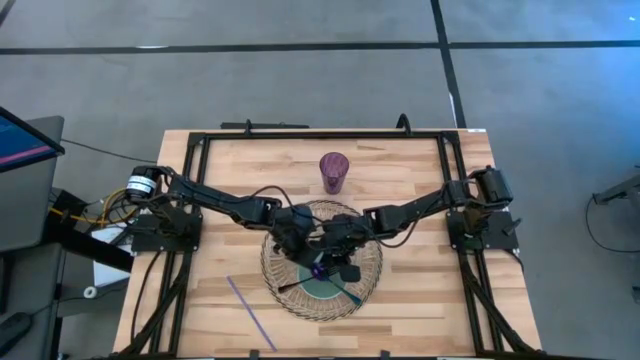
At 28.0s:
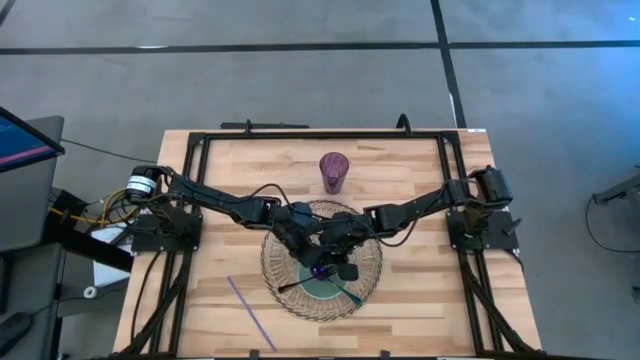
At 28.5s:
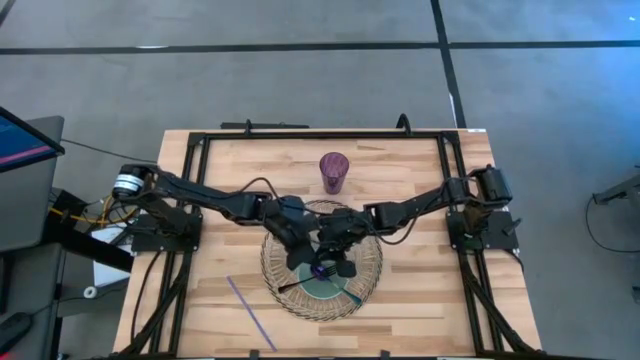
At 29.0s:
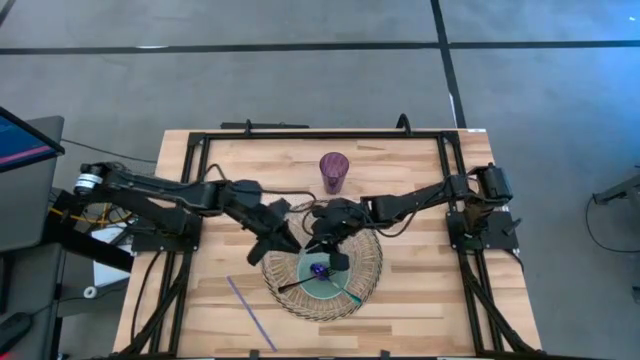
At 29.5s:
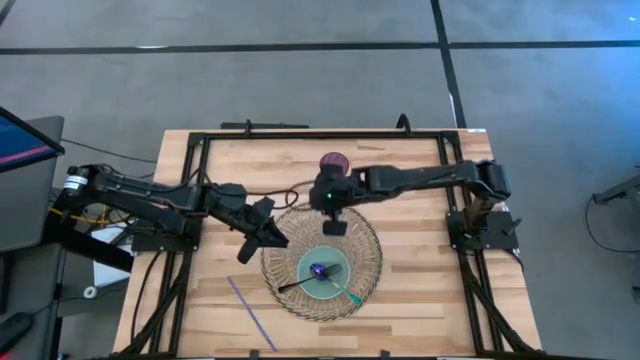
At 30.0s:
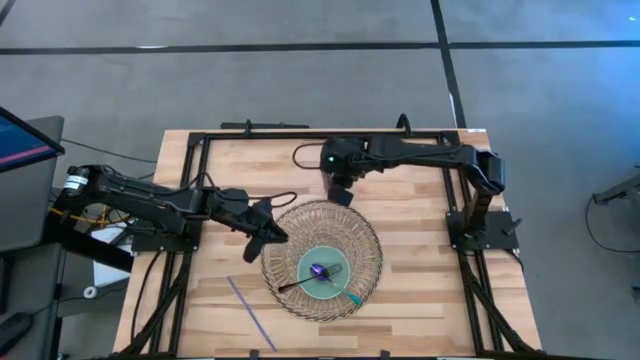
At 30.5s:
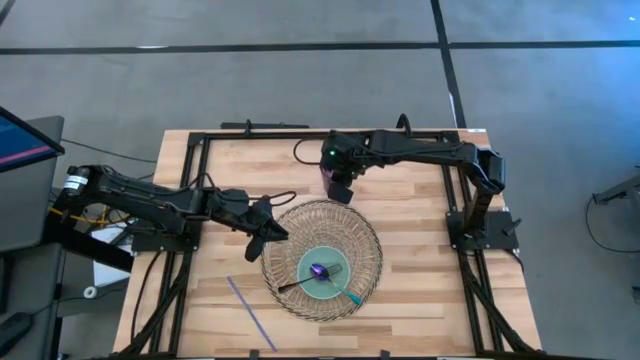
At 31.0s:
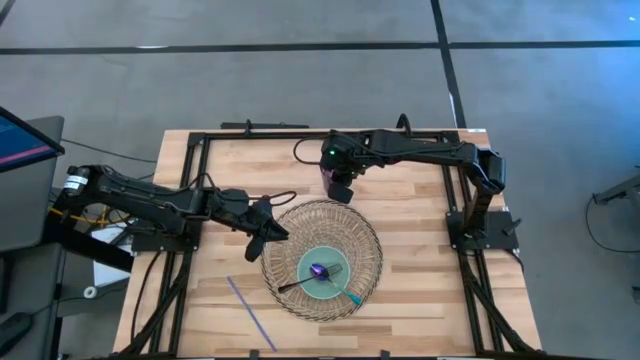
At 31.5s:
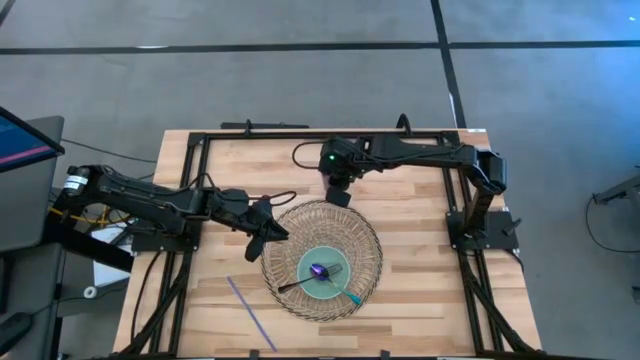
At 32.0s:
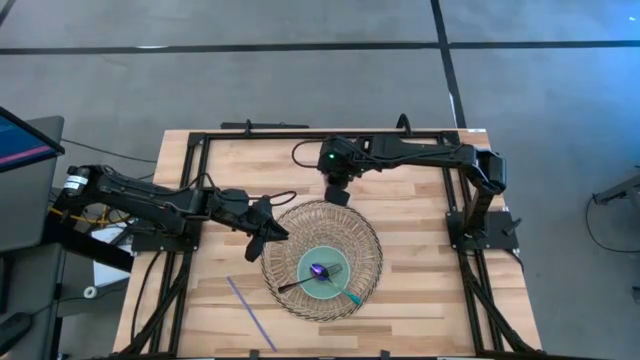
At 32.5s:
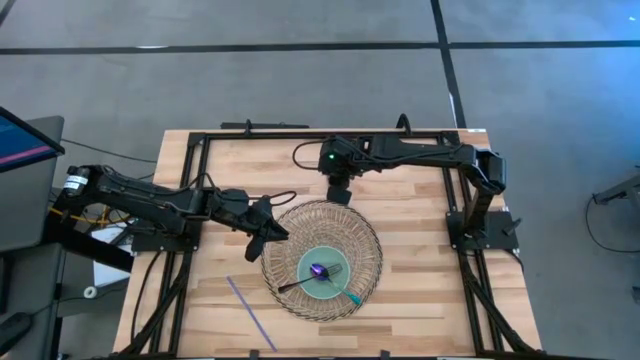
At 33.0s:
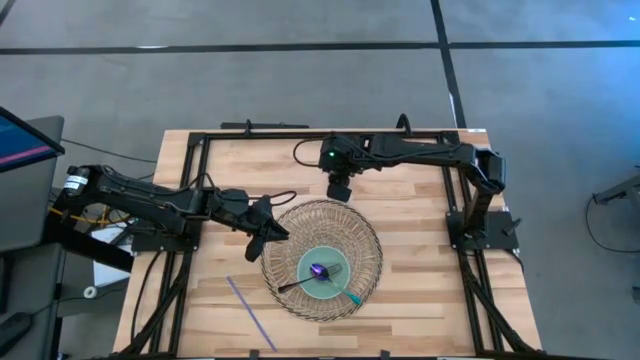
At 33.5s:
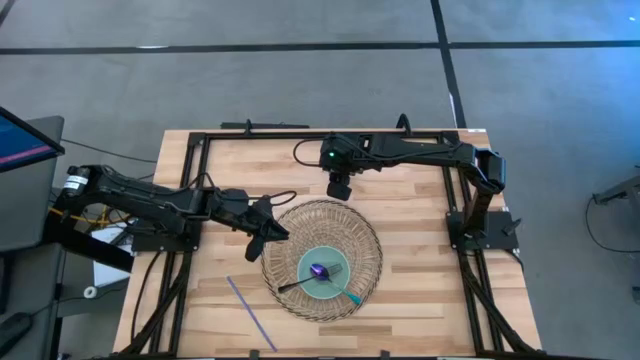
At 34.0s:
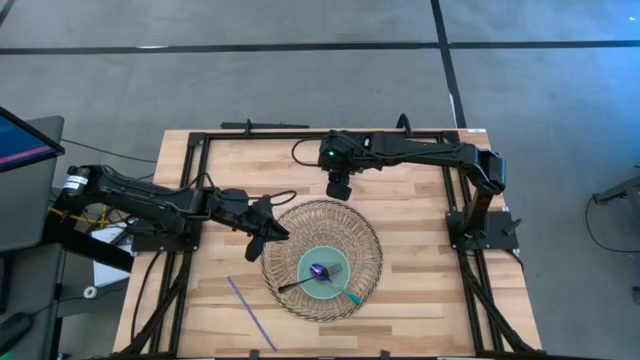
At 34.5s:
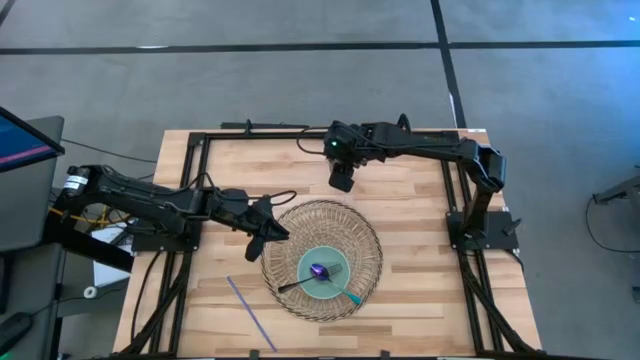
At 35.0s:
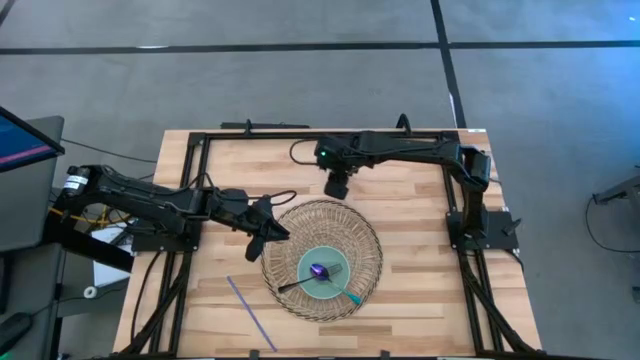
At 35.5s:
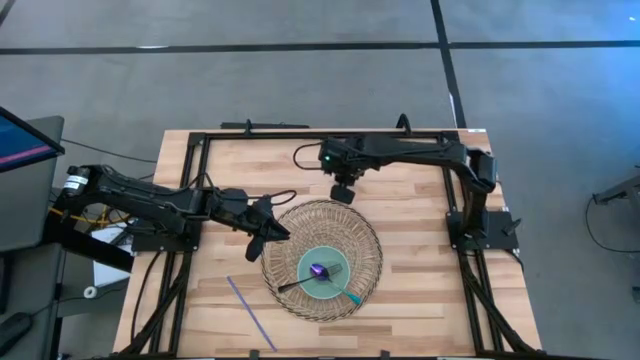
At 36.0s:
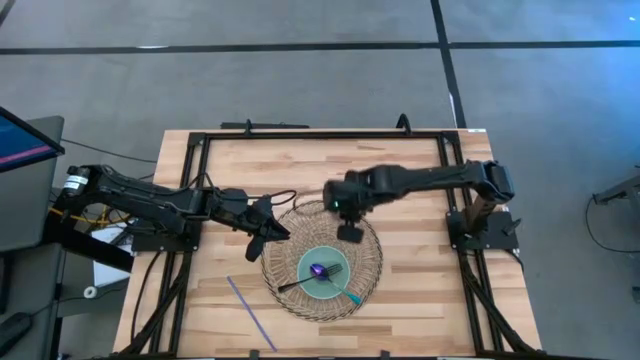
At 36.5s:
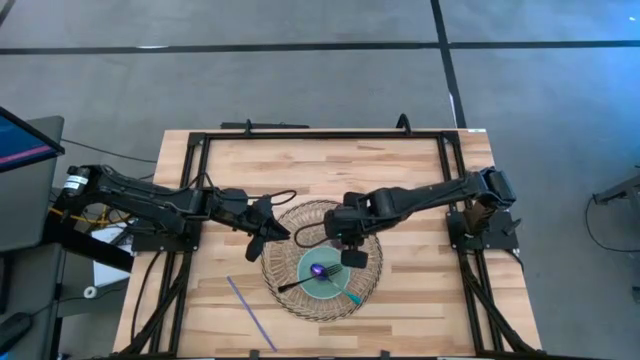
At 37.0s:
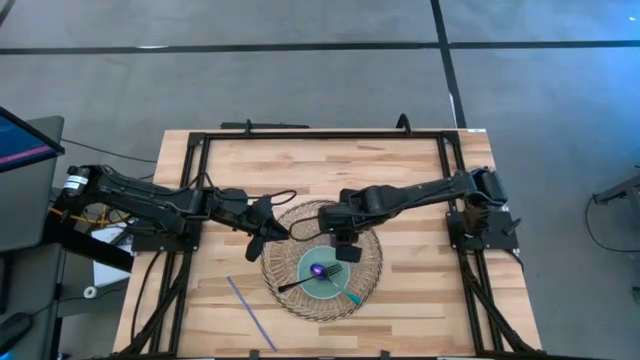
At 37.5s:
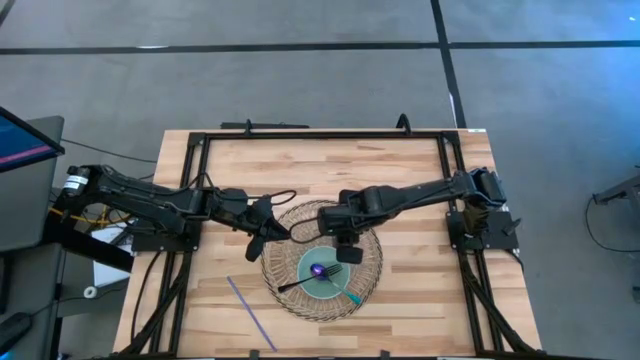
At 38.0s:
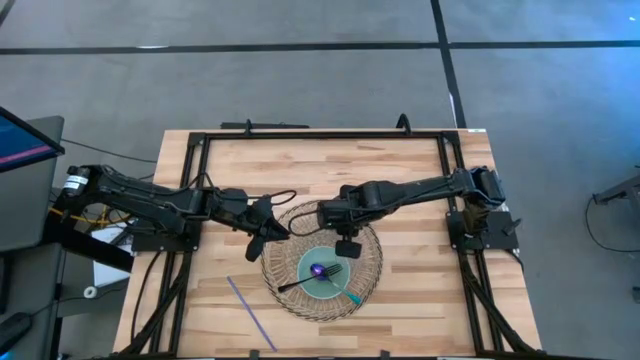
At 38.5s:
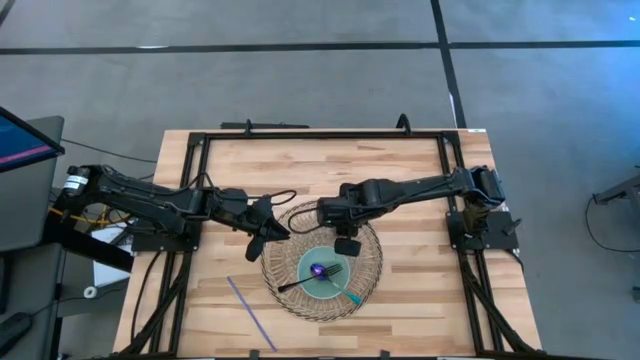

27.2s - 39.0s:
Task: Pick & Place Utensil
Put the purple cup on the brown mat to the top right of the green bowl

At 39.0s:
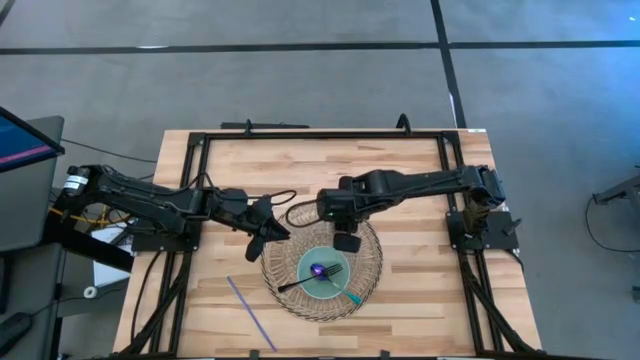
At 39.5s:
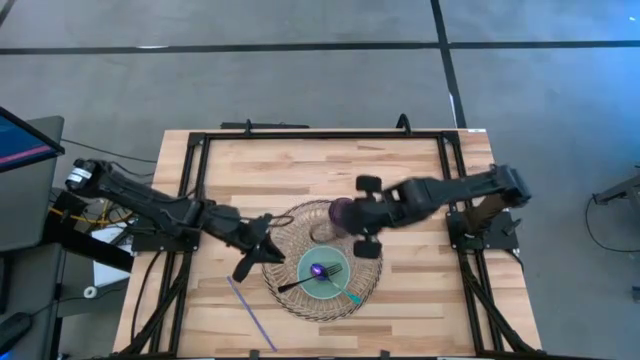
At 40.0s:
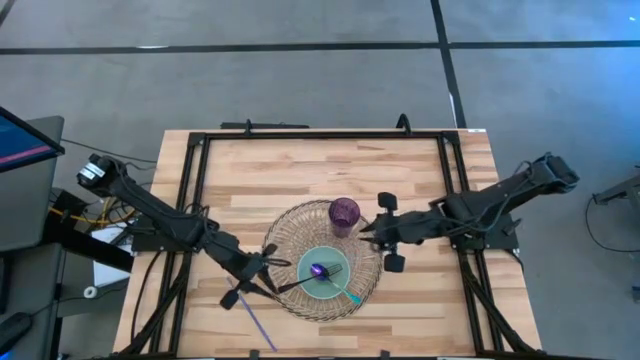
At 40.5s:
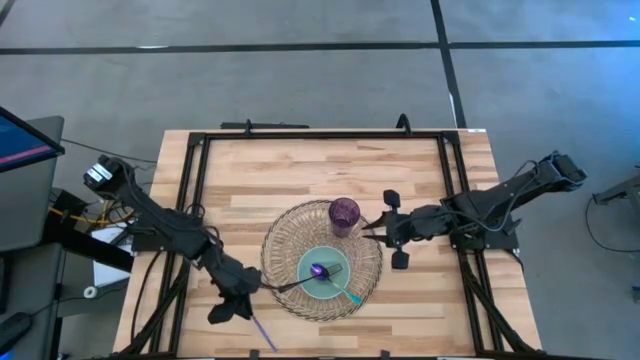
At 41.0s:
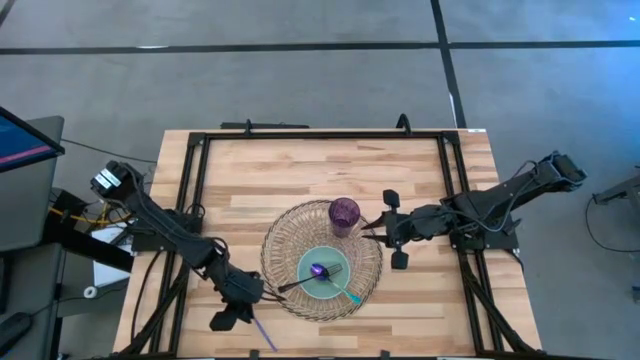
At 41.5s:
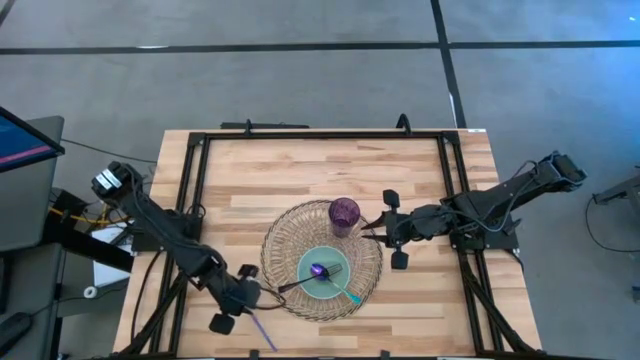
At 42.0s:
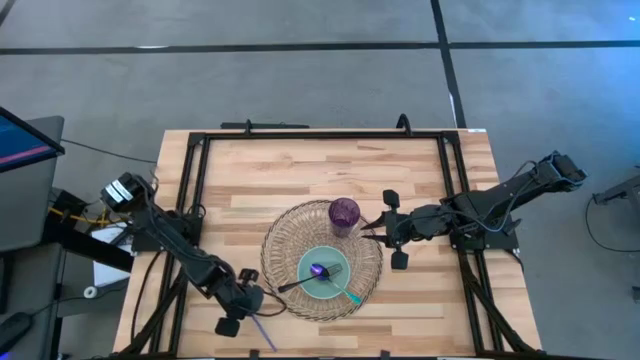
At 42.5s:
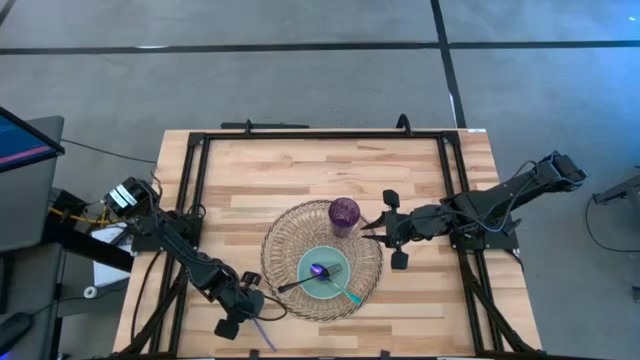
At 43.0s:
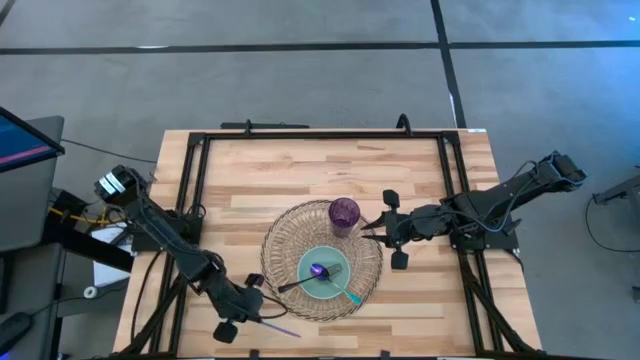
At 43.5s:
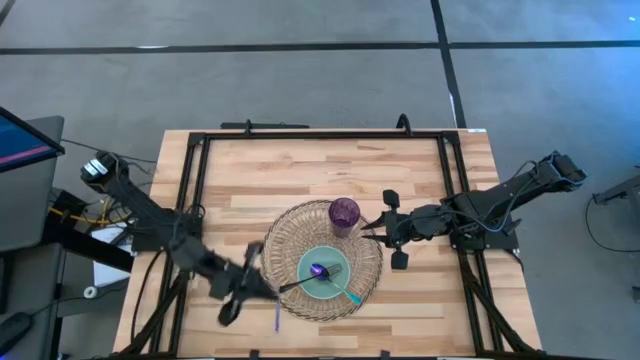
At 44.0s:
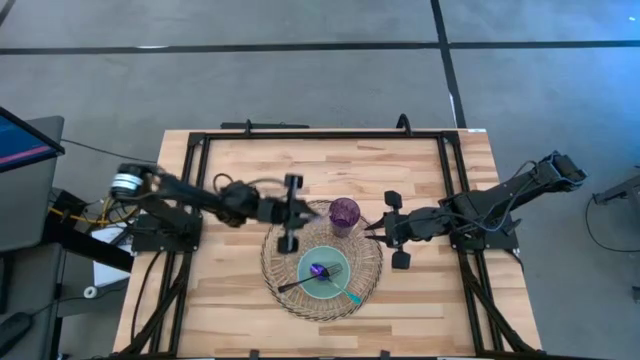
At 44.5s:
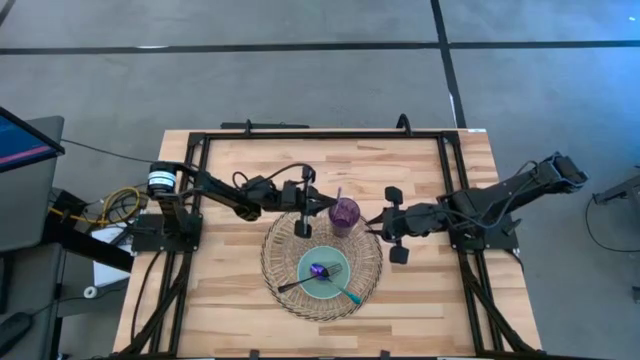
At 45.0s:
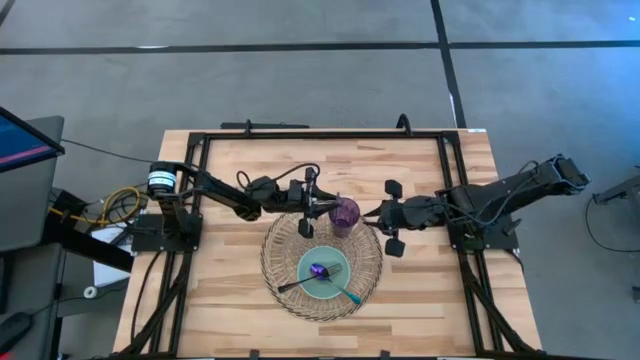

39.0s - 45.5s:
Put the purple straw into the purple cup

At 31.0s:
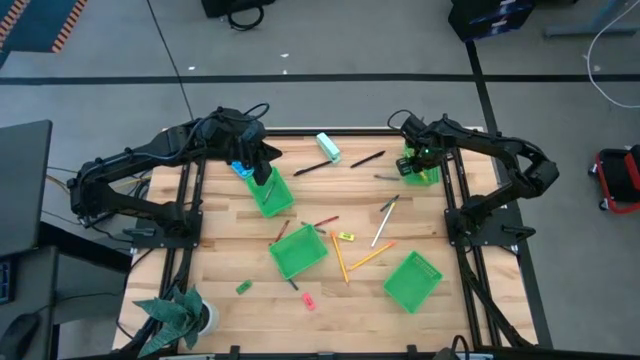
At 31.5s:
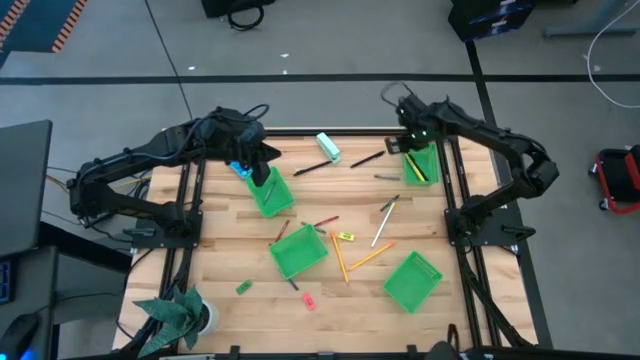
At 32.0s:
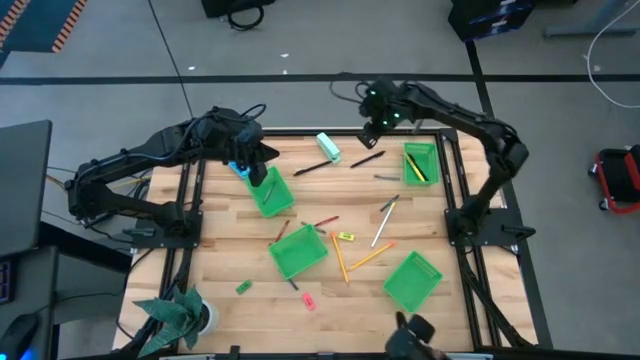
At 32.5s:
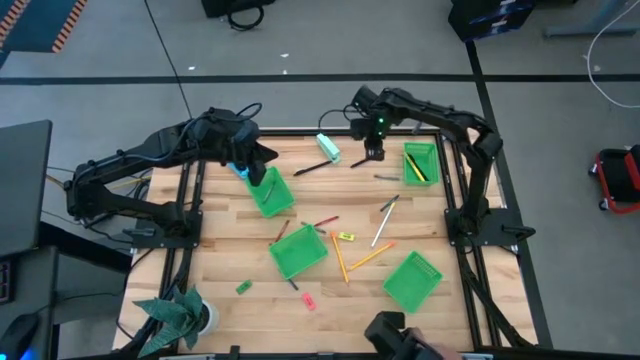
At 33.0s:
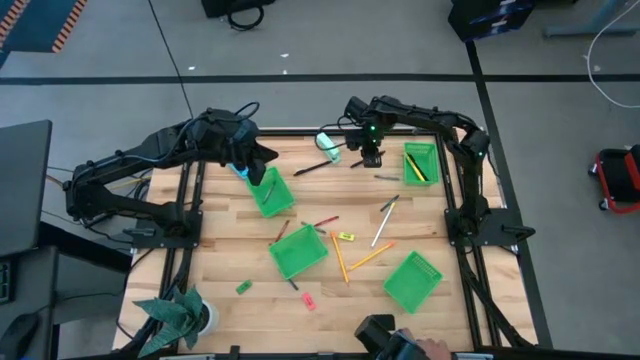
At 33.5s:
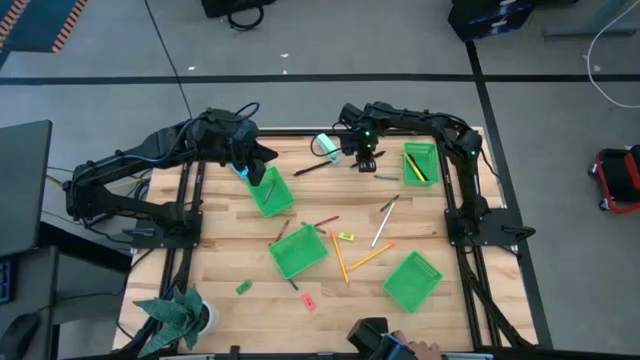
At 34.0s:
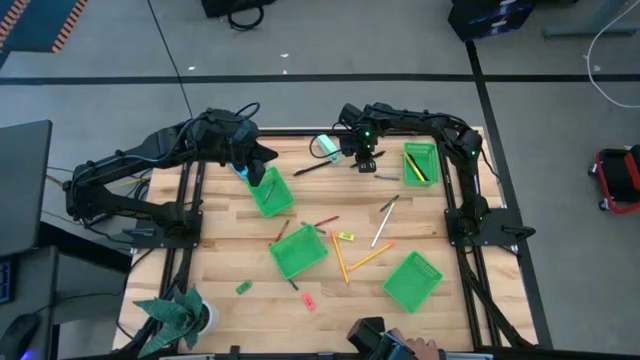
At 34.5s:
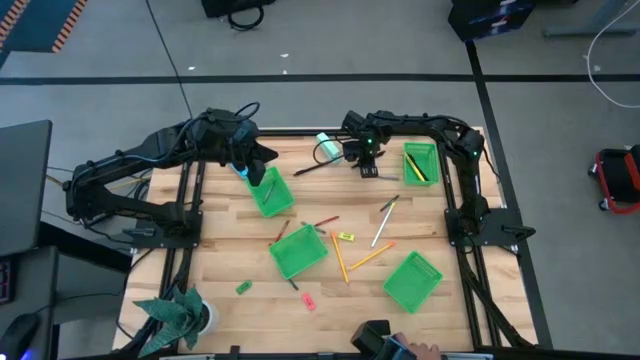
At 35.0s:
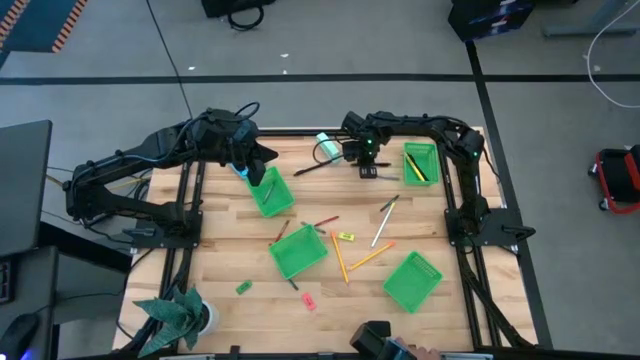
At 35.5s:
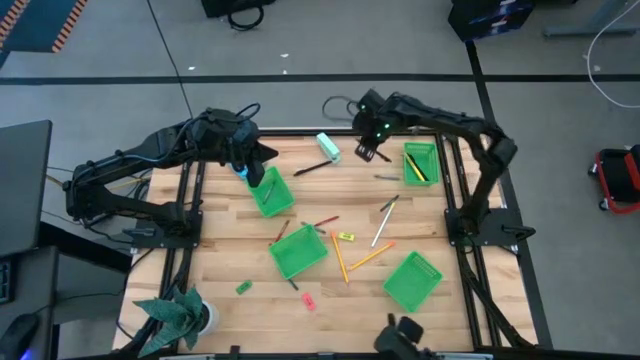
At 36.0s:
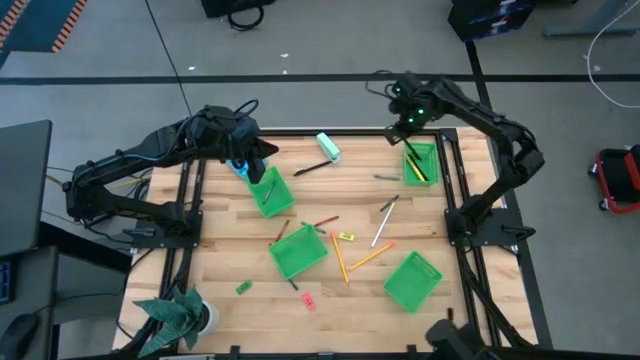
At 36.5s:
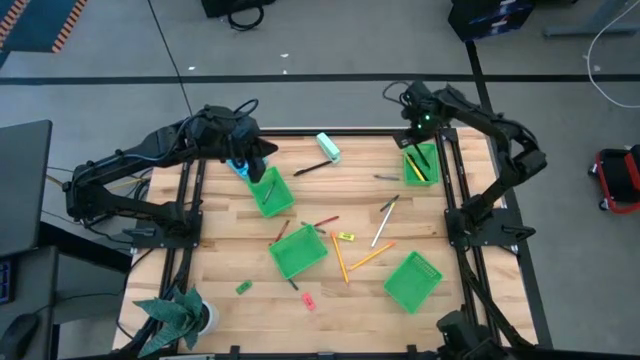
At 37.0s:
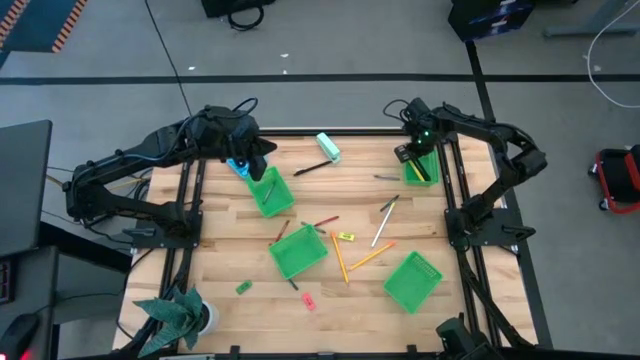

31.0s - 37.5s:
Task: Sort crayons/erasers/pens/pencils in bins
Put the right black pen into the top right green bin
